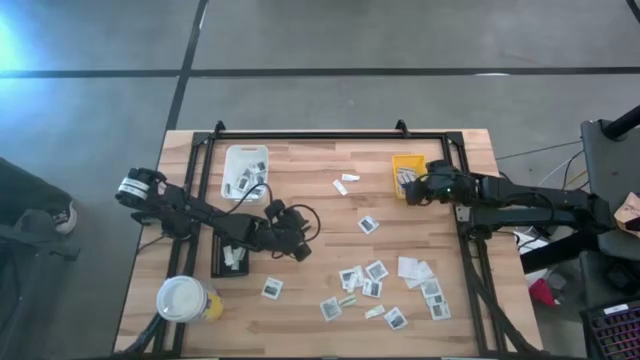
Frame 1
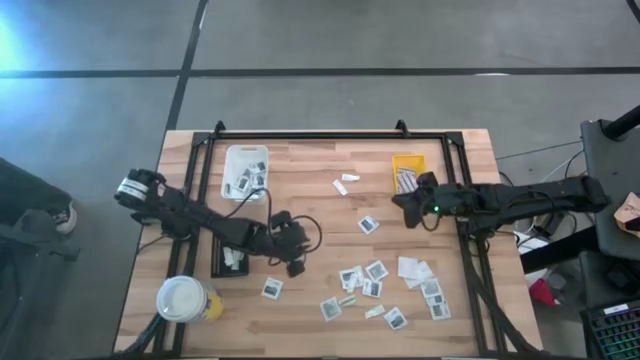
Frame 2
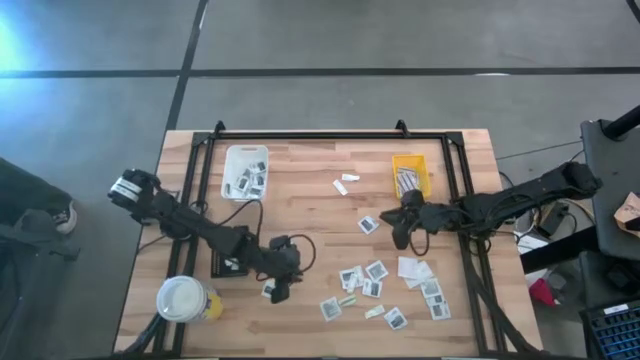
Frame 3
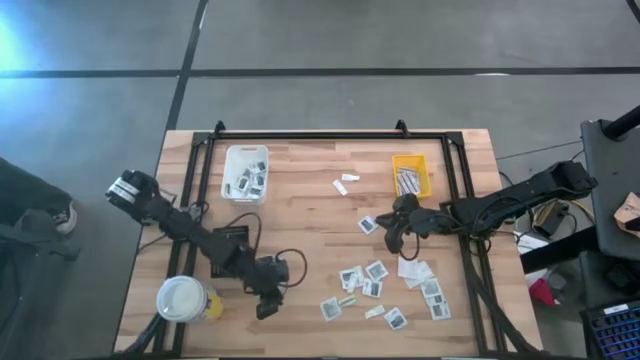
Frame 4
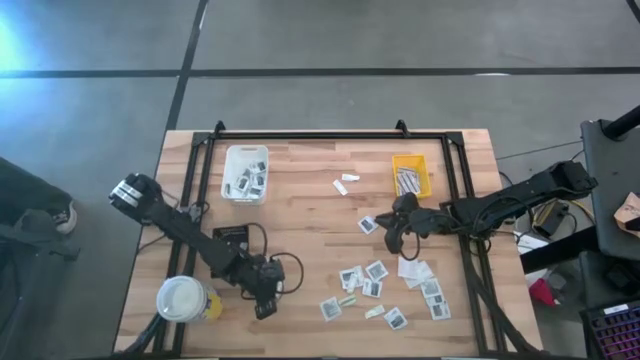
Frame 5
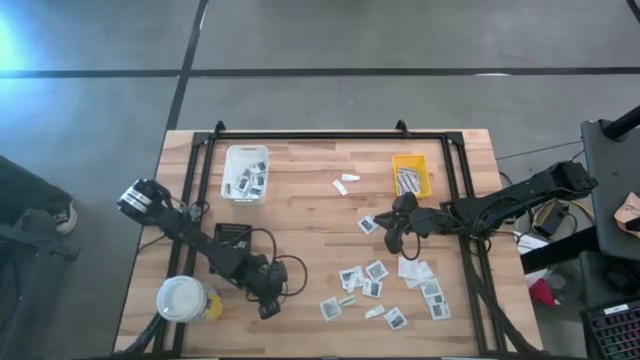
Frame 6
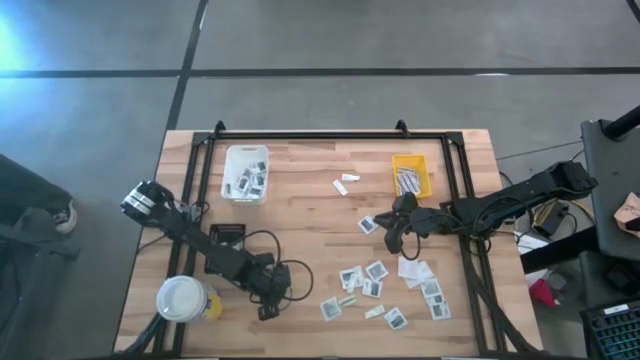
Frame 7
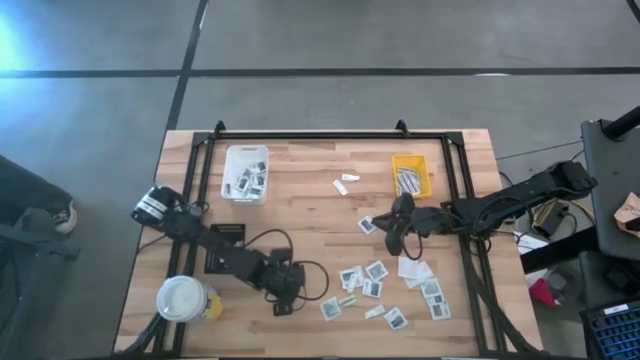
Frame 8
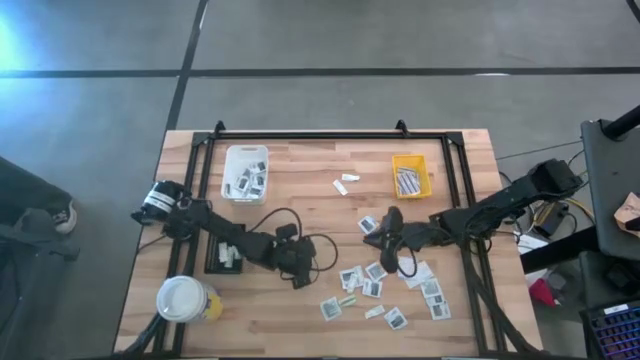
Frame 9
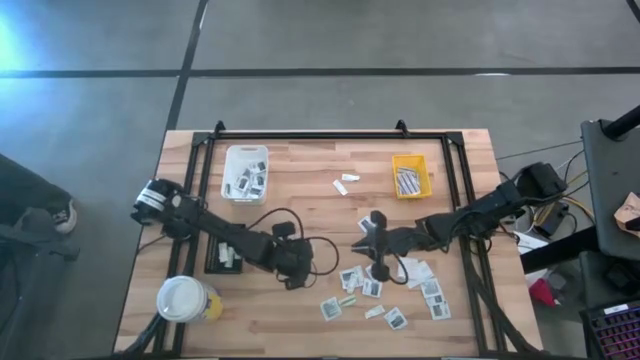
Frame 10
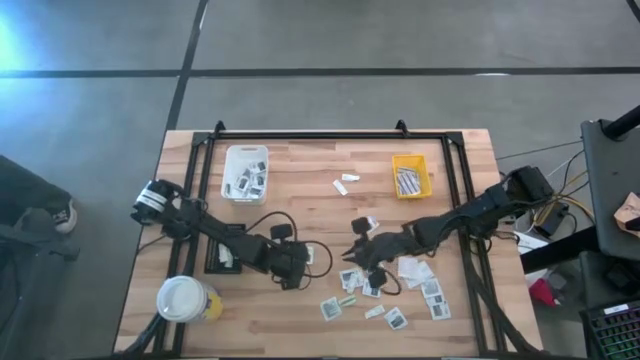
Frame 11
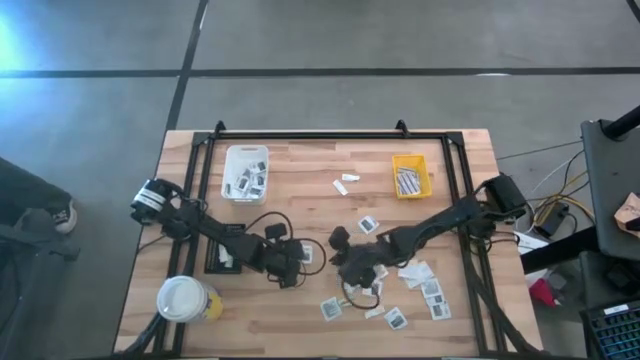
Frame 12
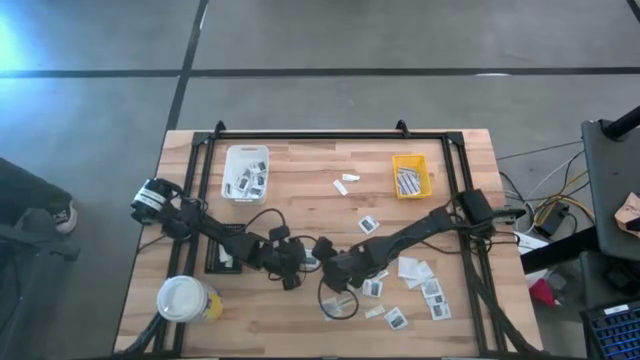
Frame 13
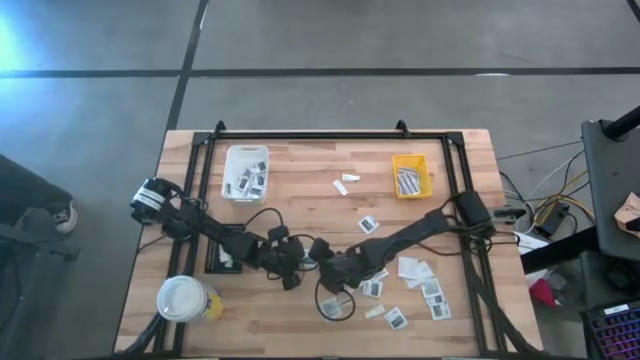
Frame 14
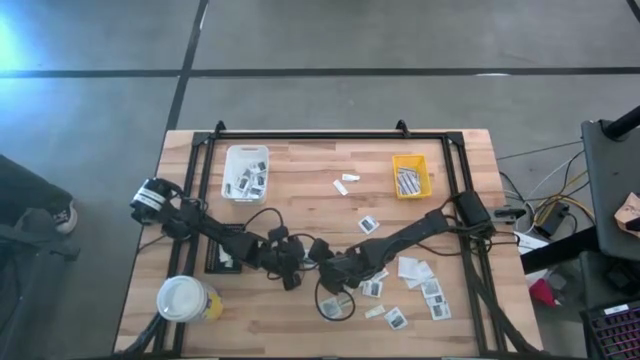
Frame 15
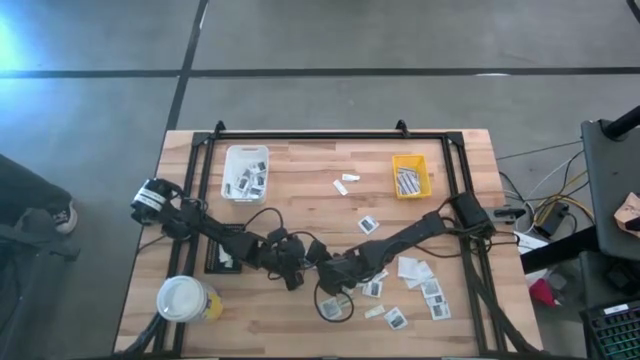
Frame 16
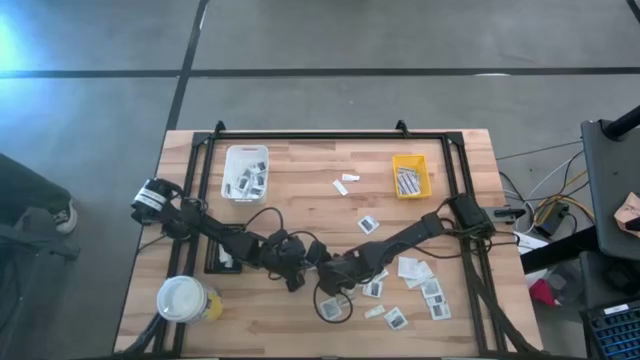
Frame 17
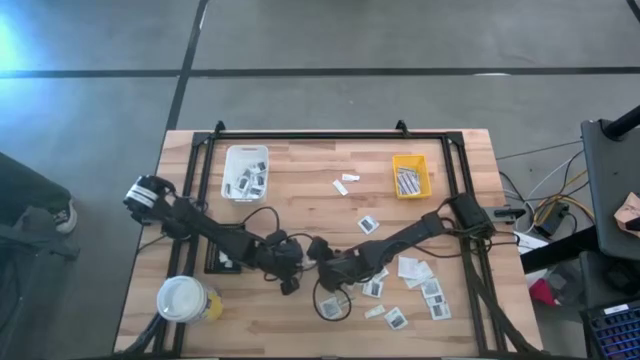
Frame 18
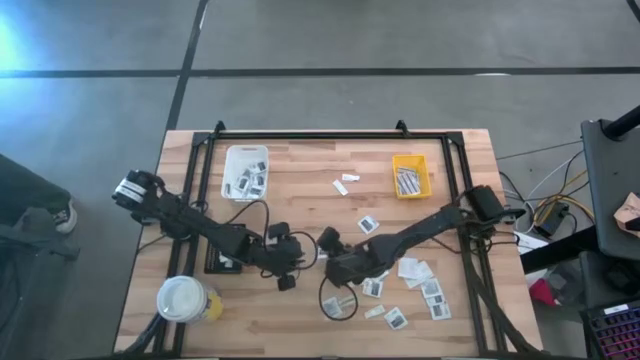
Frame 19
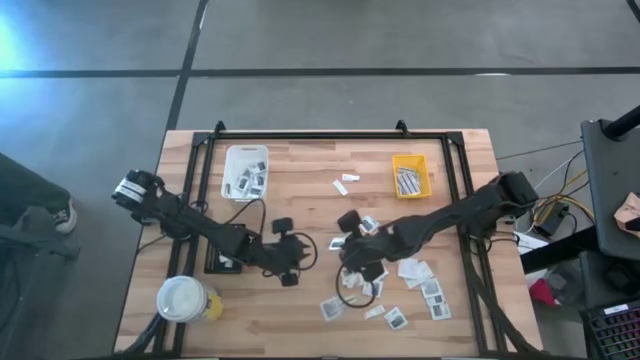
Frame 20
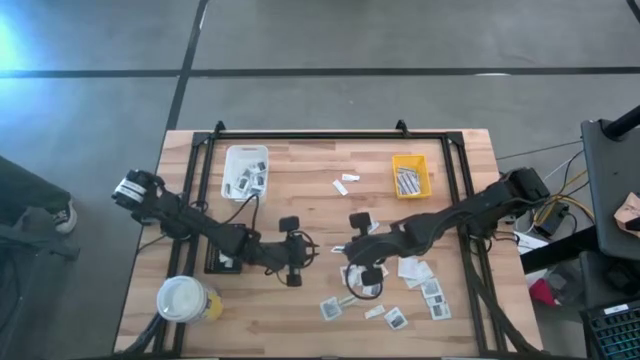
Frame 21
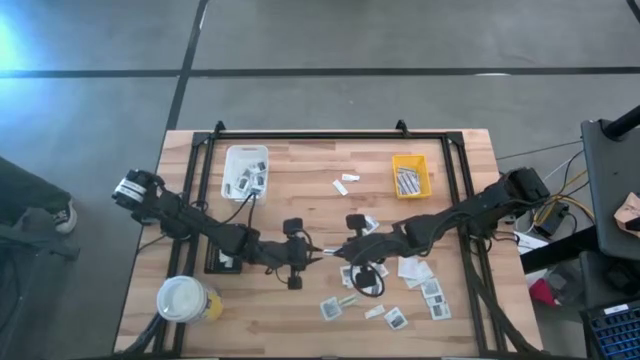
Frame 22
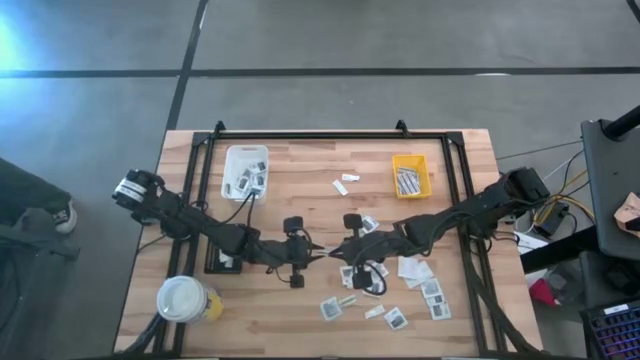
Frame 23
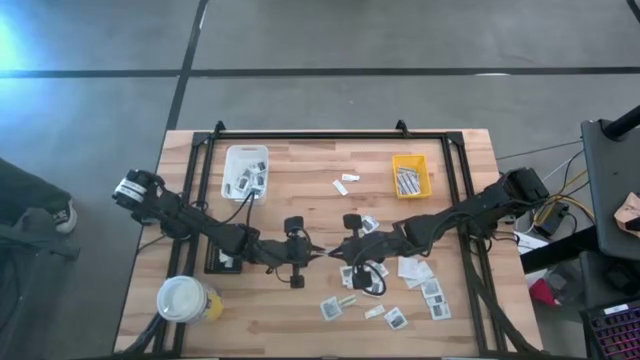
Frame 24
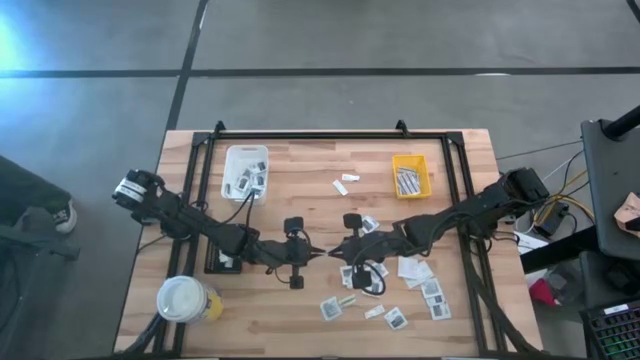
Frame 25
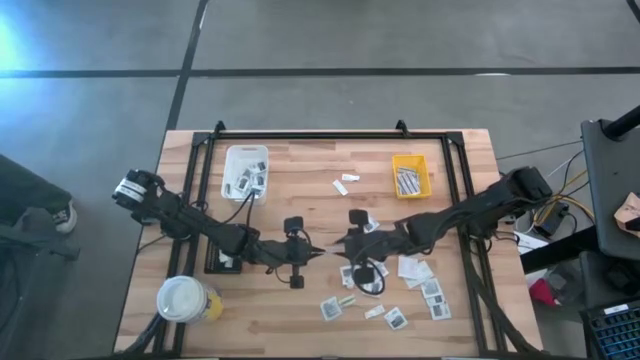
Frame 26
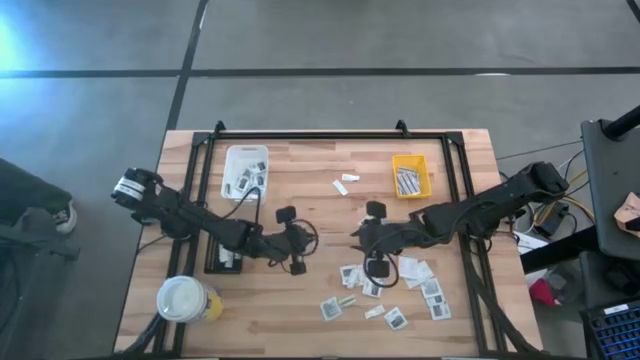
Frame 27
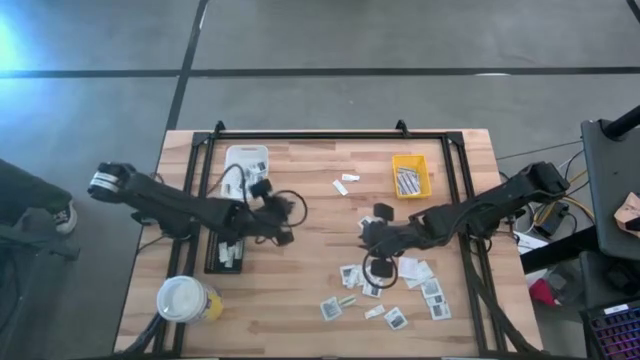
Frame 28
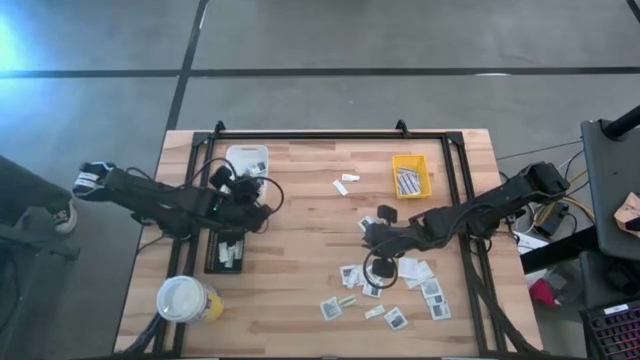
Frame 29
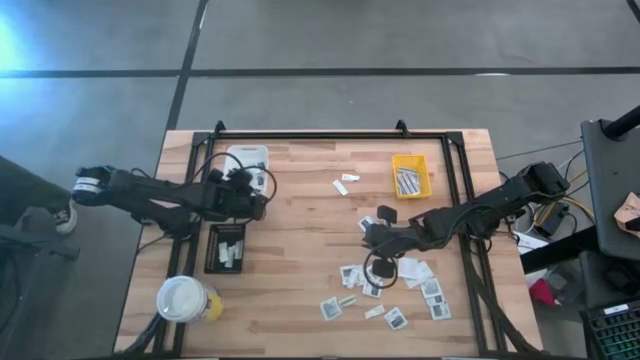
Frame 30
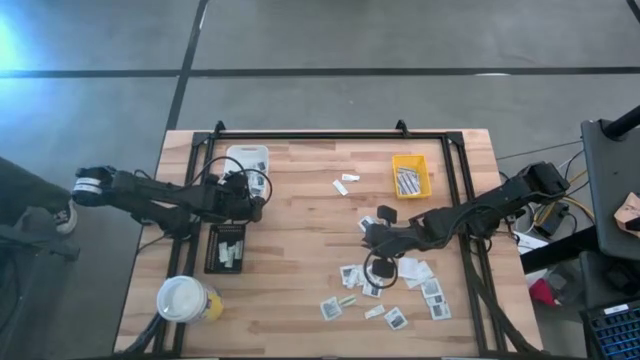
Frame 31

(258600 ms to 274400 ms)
Task: Pick & Place First Aid Supplies
Put the gray towelette pack into the white bin

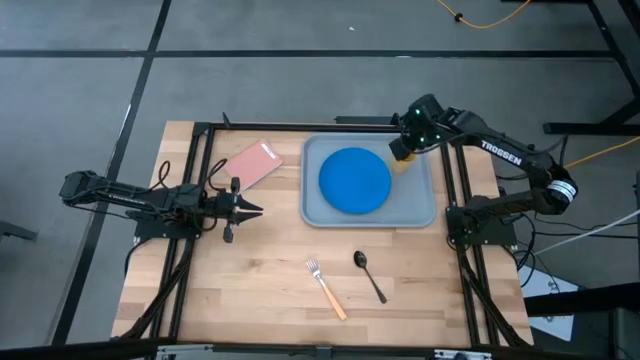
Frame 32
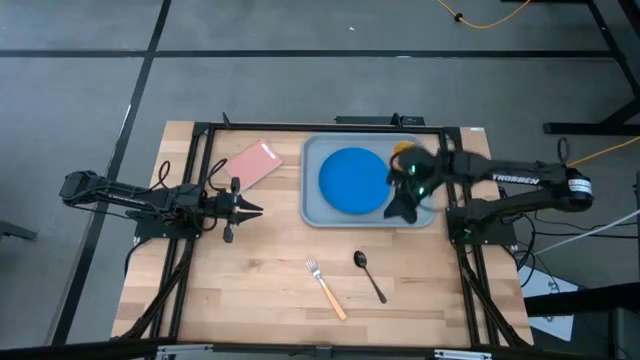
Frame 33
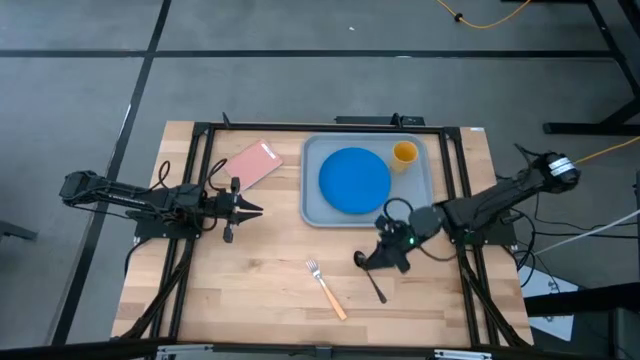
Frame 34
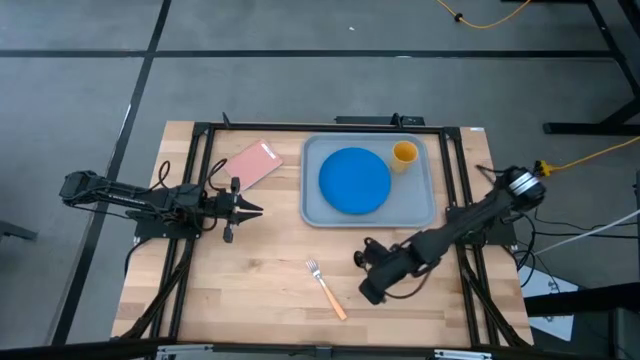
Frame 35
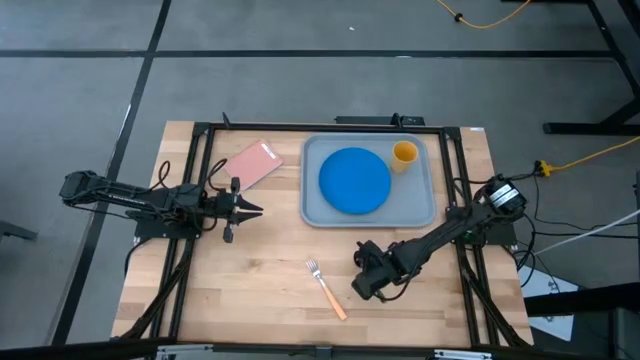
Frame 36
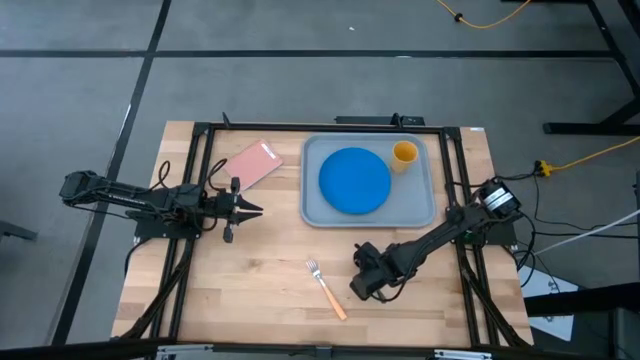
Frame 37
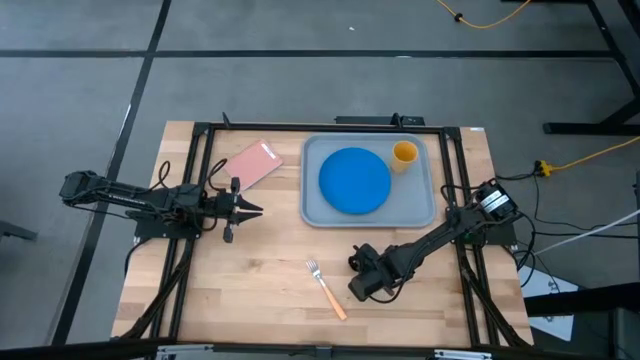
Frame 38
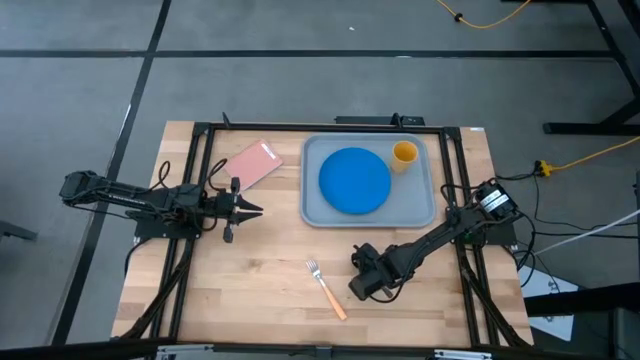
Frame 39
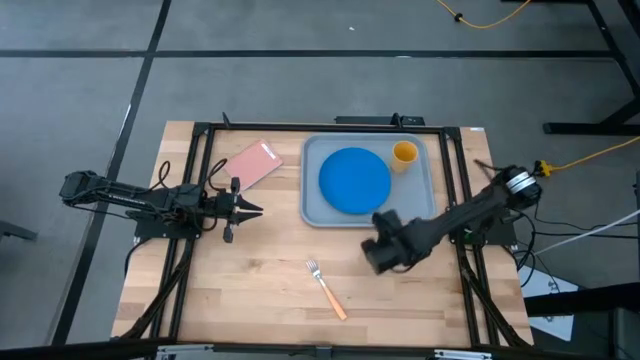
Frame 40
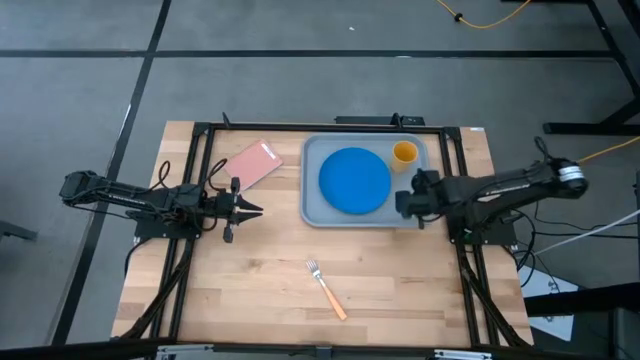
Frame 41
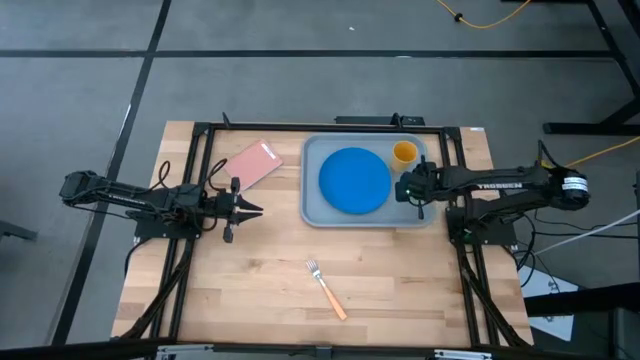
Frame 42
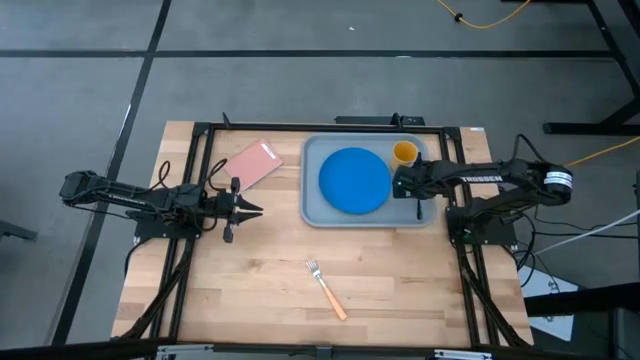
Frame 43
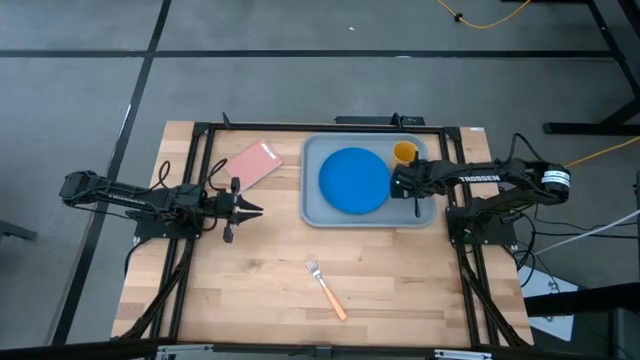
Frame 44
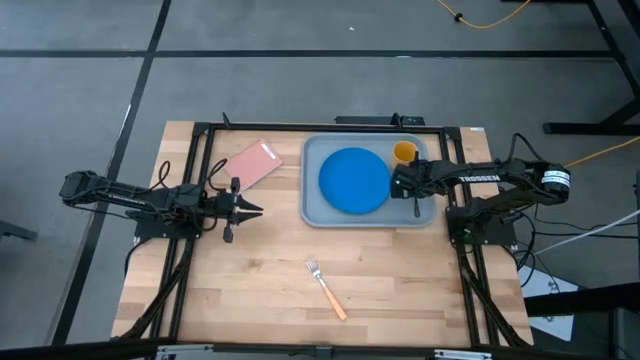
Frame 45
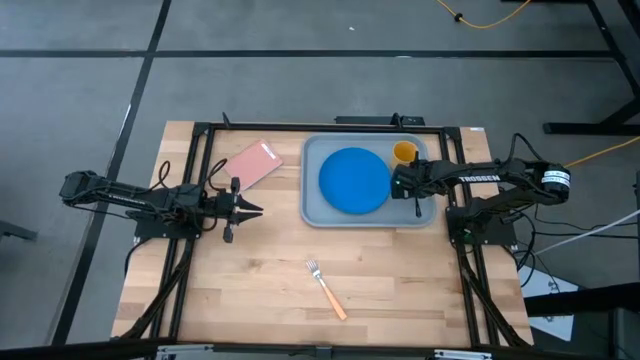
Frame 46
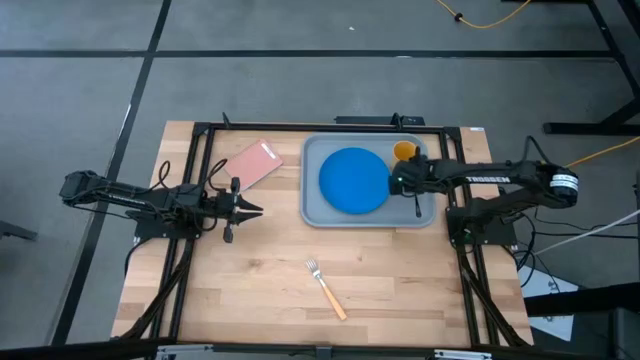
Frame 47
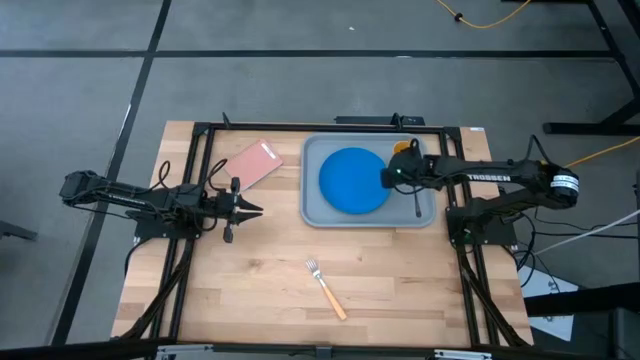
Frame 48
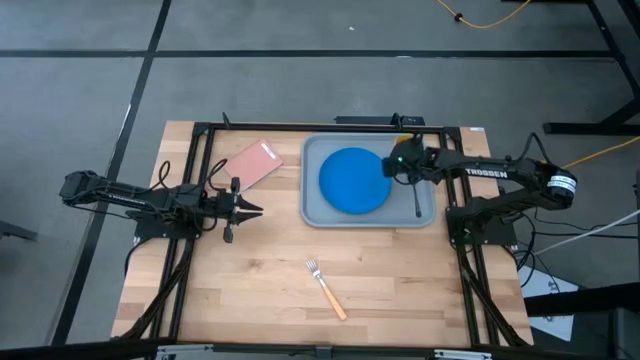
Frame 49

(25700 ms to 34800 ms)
Task: Pick and place plate/cup/fork/spoon on tray
Put the spoon on the gray tray
